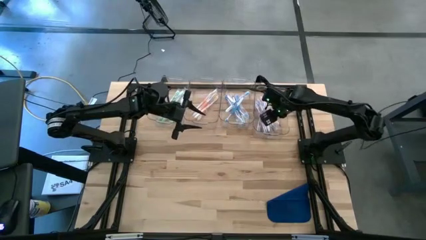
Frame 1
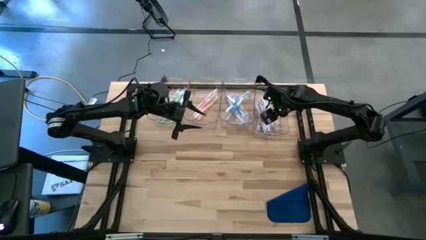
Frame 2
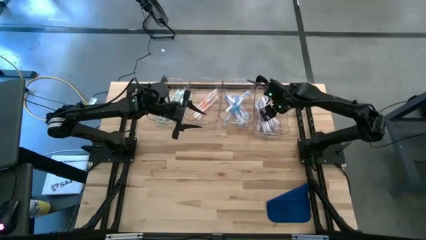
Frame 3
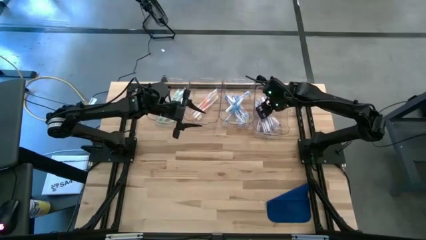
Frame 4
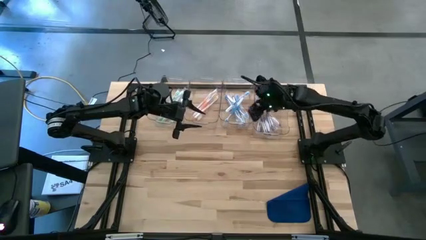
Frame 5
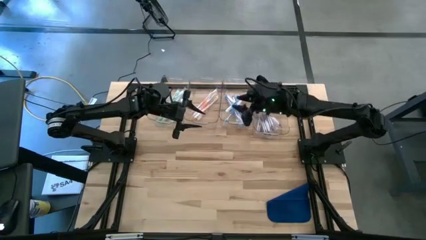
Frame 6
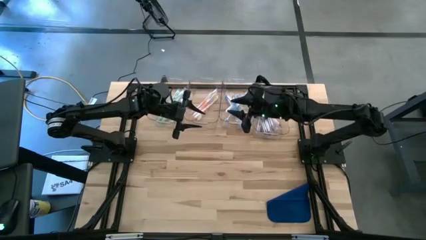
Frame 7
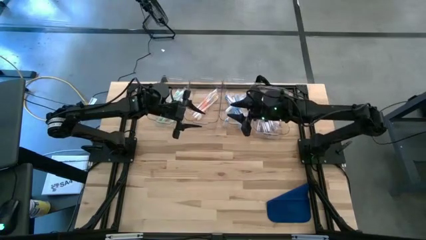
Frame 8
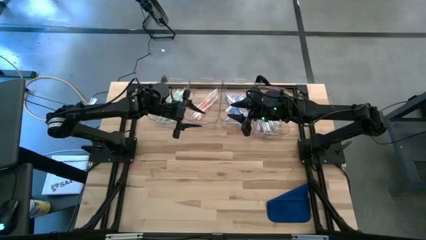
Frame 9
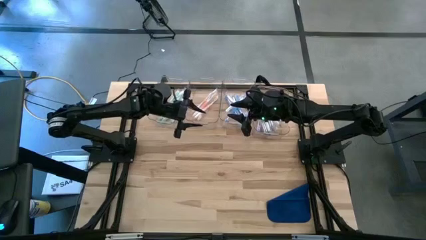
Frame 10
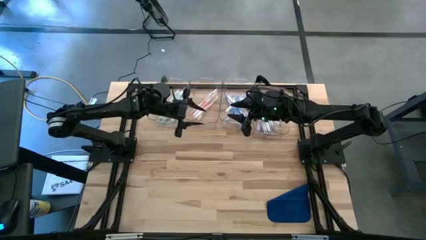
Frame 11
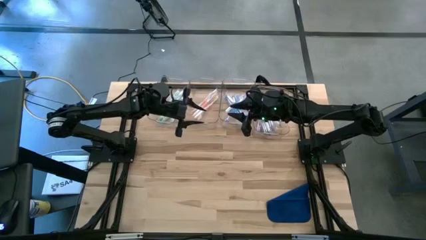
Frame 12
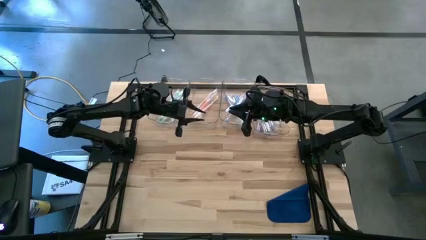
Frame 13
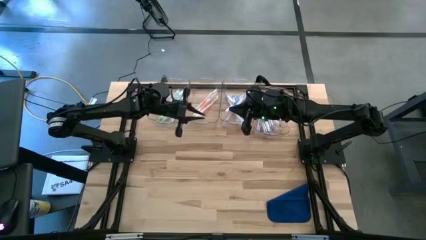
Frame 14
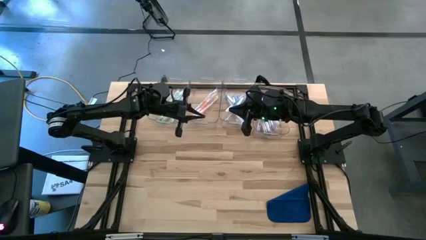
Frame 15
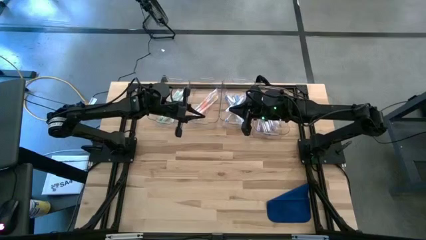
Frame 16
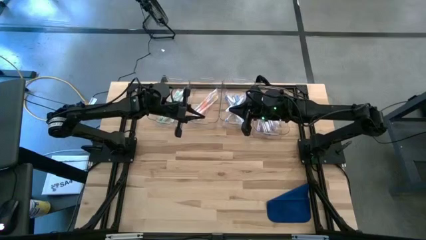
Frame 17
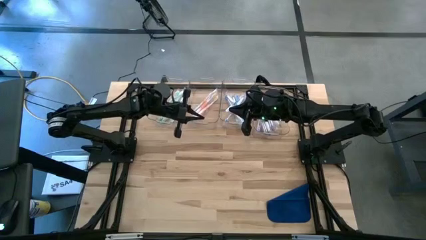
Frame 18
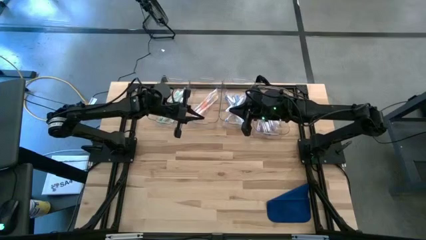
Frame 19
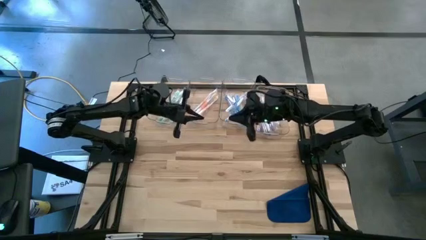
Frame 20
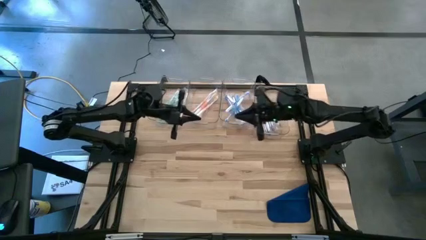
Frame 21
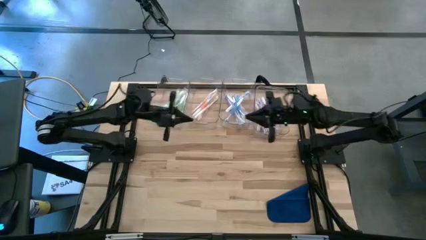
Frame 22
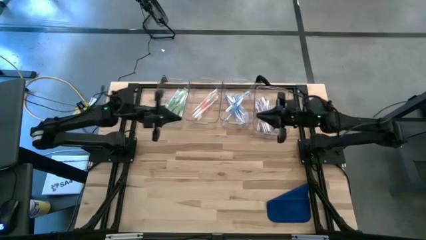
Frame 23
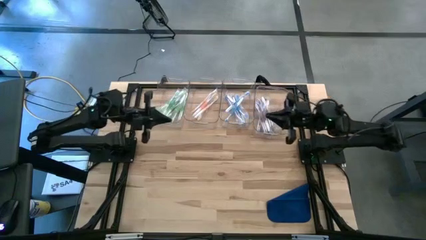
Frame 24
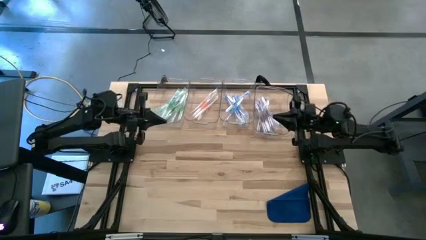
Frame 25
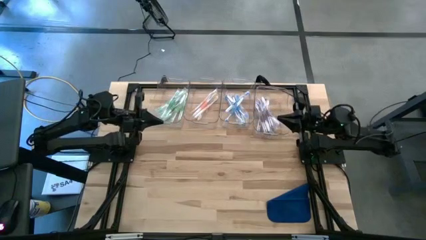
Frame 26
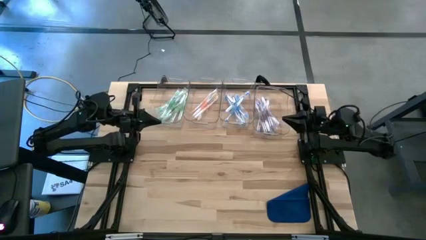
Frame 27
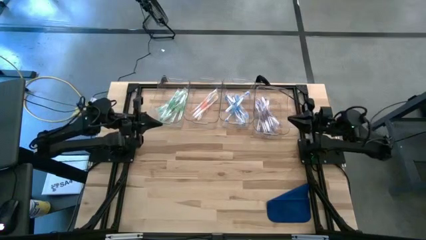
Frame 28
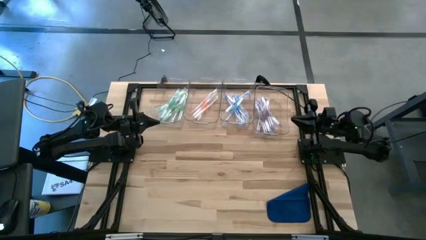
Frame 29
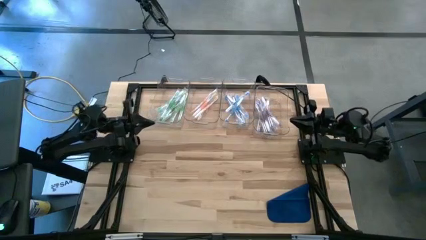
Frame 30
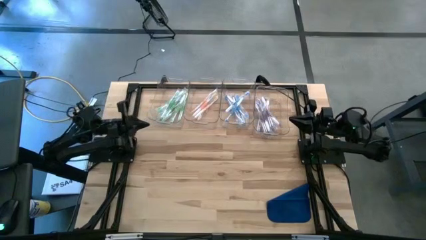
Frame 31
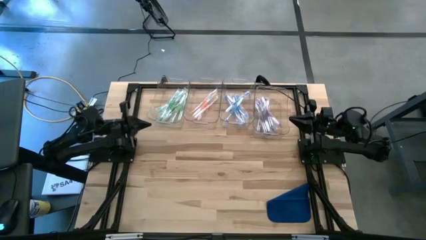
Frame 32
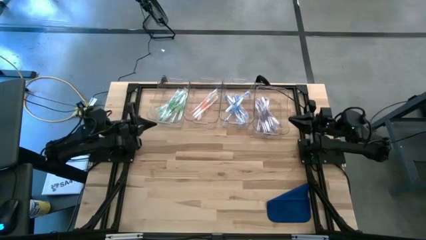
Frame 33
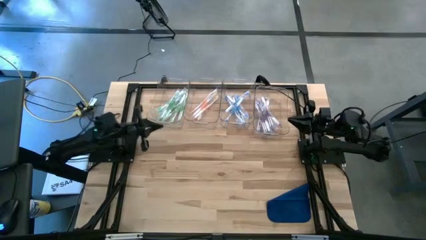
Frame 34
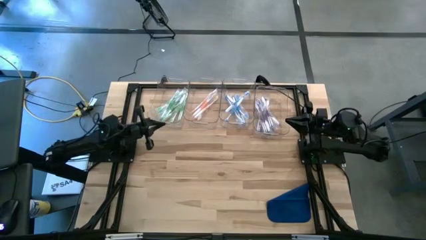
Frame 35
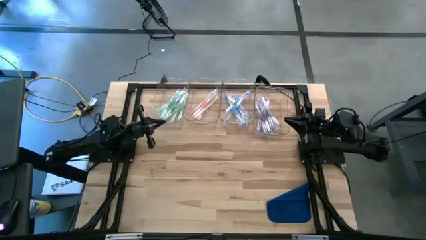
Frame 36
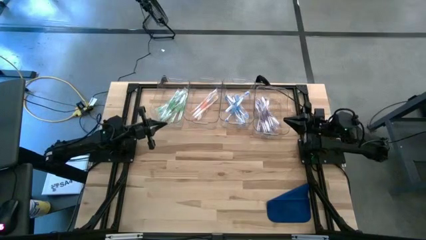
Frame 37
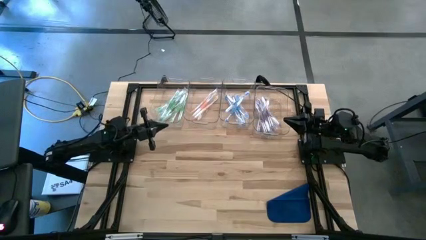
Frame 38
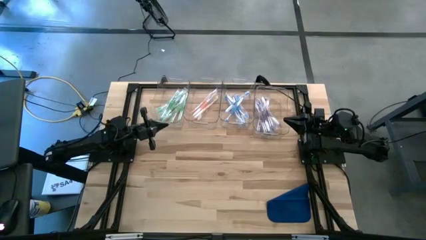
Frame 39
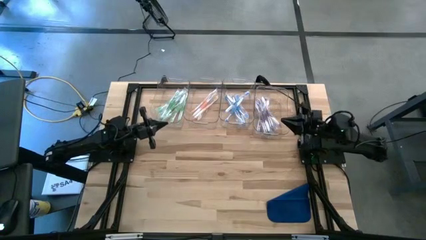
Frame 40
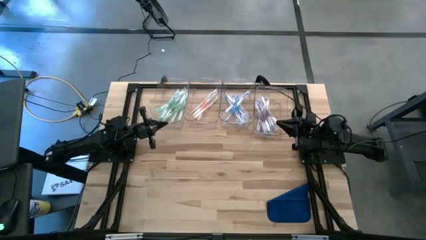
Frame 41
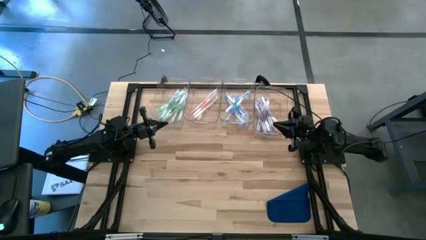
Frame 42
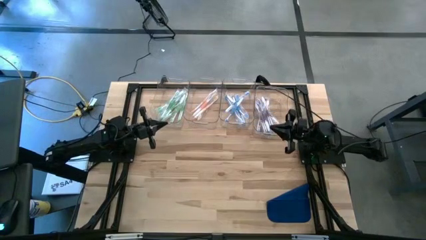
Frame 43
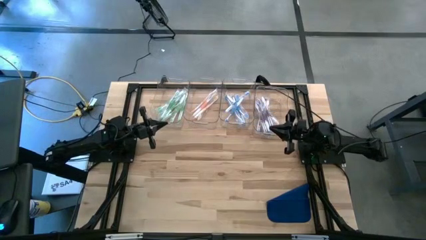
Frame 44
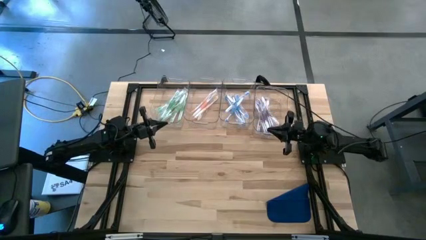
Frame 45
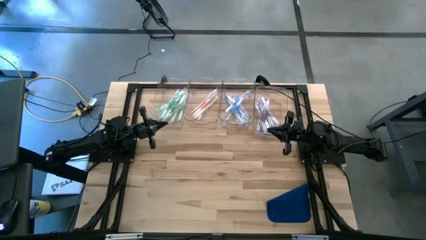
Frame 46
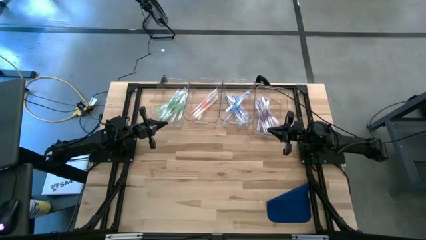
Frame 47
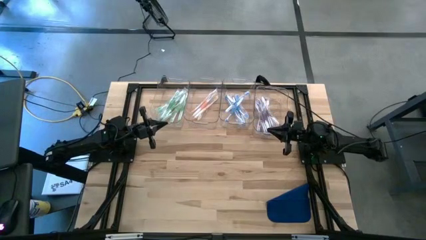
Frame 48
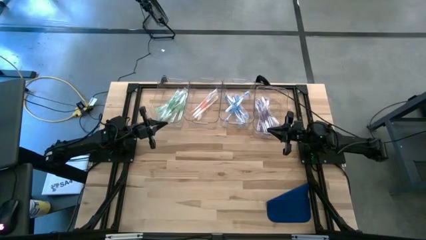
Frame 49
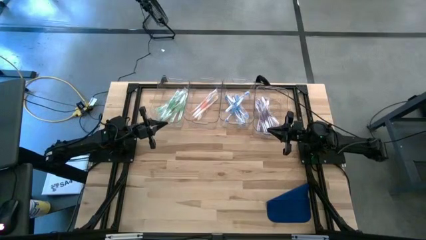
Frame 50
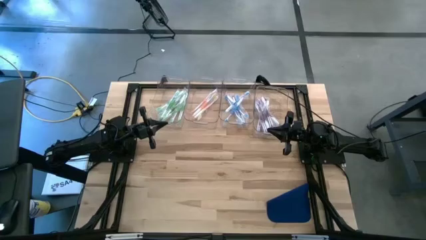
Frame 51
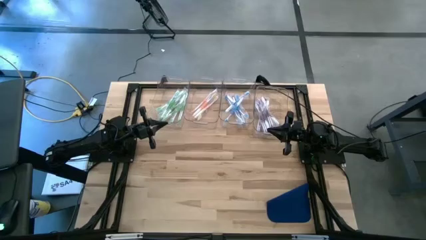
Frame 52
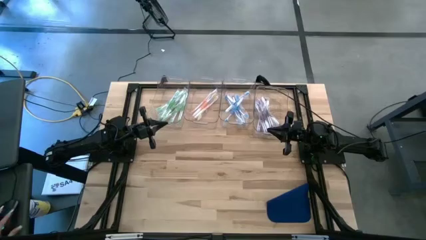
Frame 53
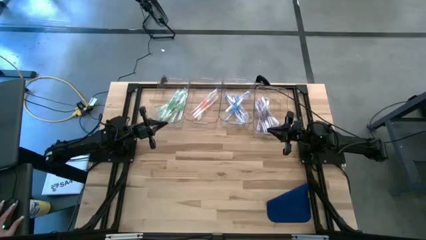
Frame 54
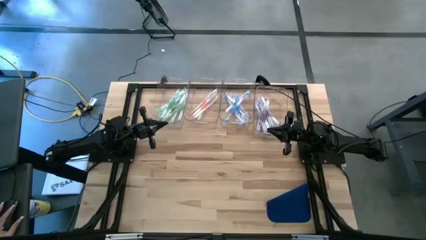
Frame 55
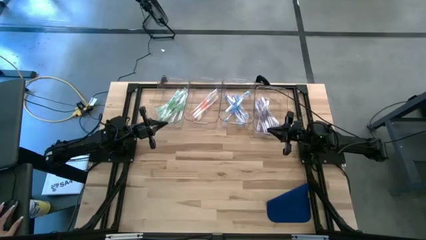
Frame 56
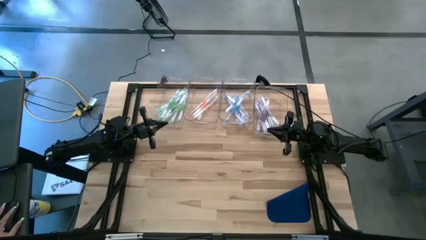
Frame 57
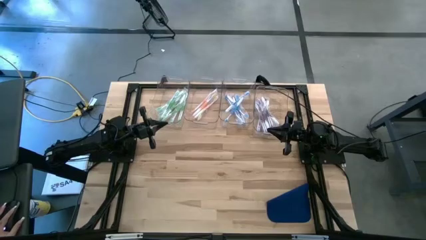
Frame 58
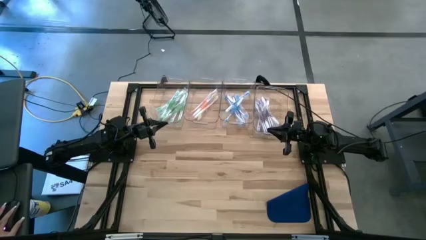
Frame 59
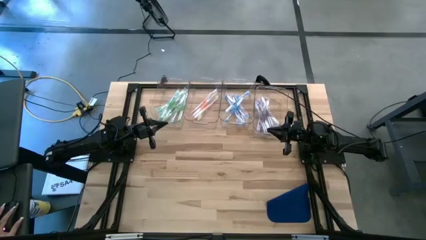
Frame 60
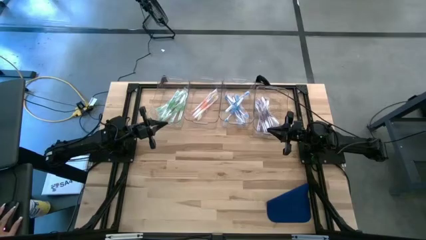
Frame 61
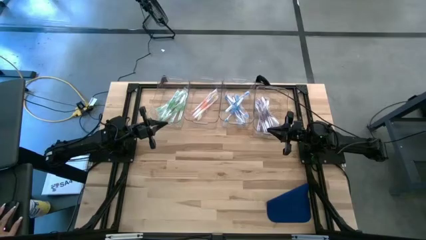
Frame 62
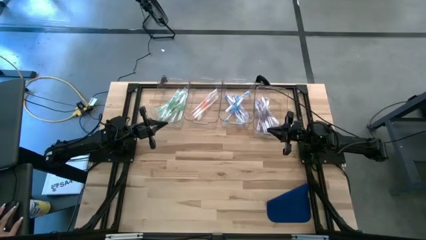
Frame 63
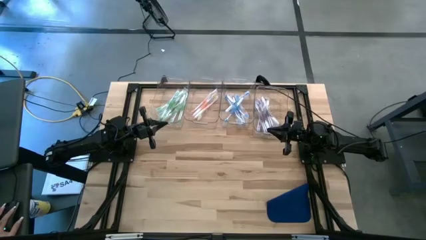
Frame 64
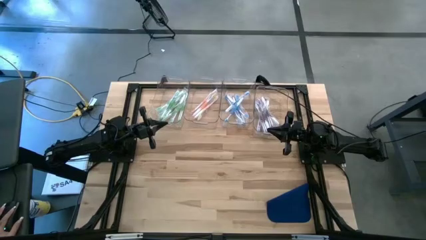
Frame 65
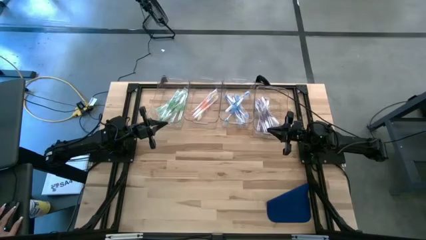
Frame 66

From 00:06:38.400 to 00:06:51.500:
Task: Pick & Place Toothbrushes
Return to Home Position

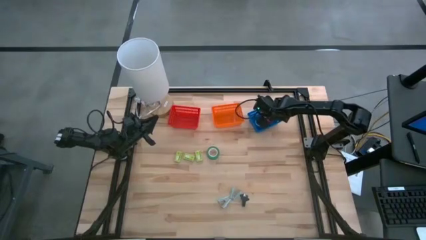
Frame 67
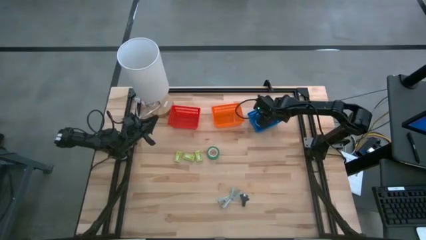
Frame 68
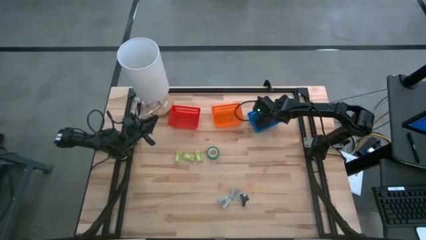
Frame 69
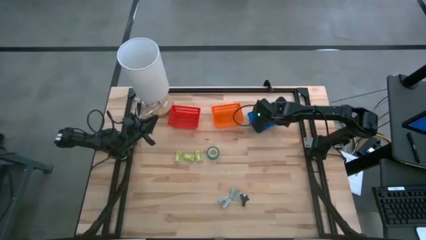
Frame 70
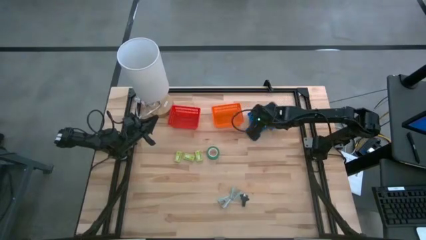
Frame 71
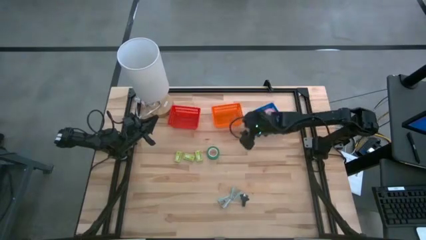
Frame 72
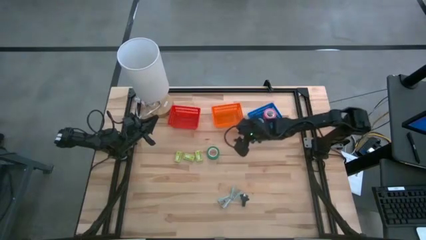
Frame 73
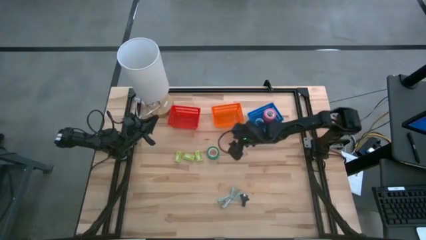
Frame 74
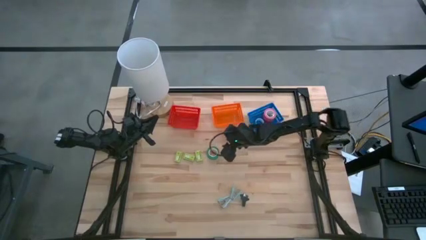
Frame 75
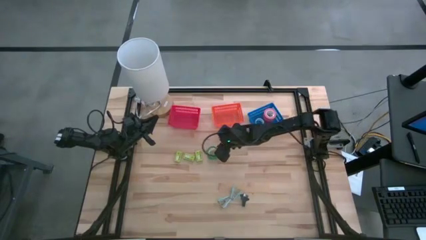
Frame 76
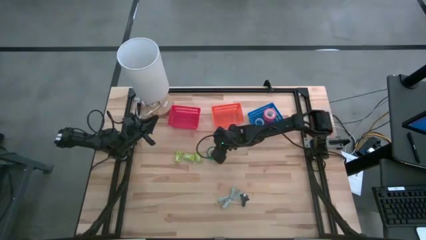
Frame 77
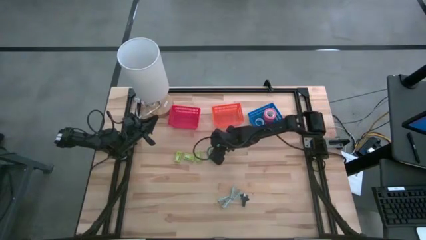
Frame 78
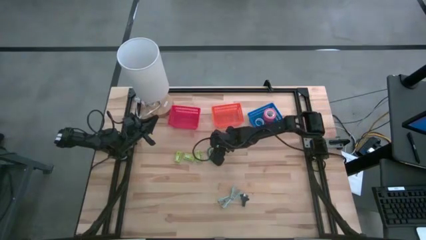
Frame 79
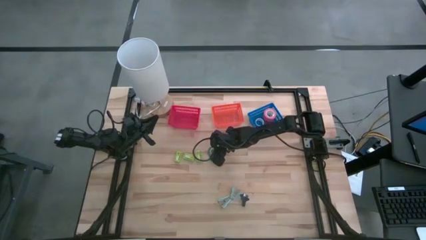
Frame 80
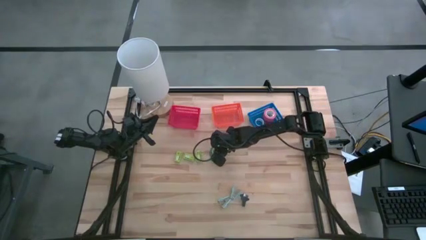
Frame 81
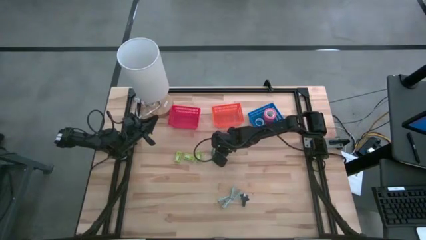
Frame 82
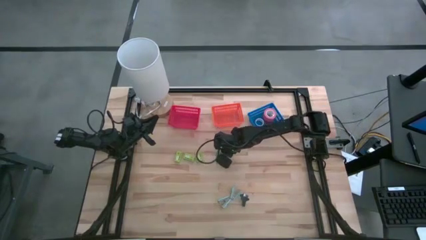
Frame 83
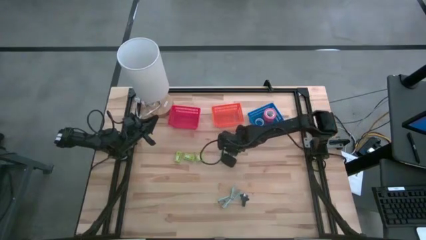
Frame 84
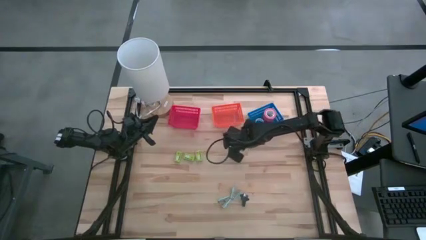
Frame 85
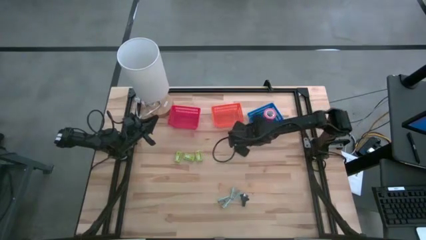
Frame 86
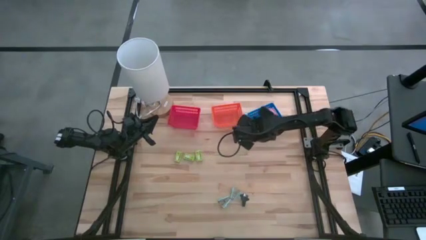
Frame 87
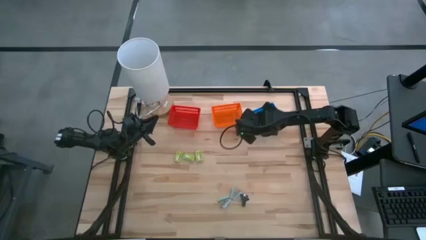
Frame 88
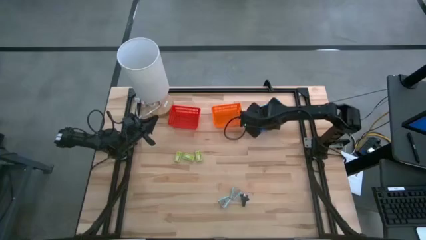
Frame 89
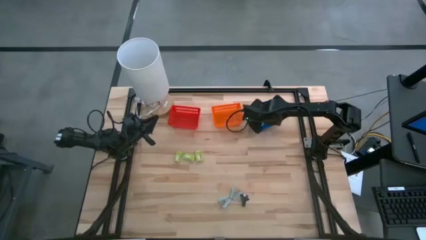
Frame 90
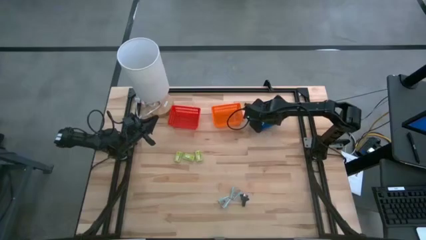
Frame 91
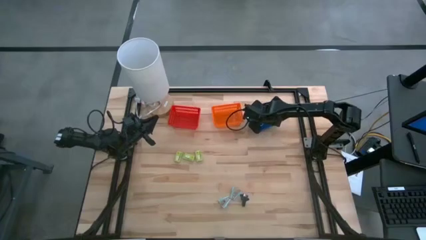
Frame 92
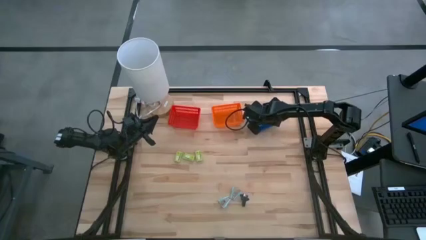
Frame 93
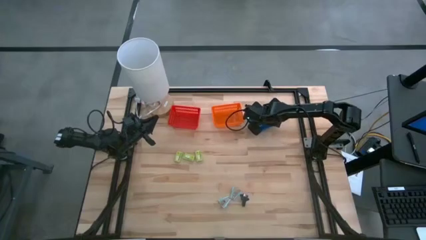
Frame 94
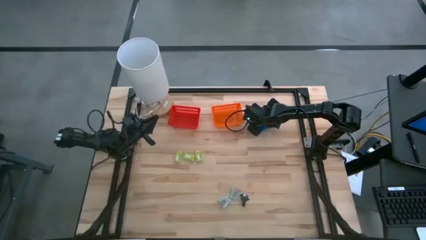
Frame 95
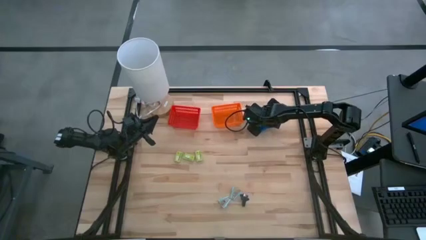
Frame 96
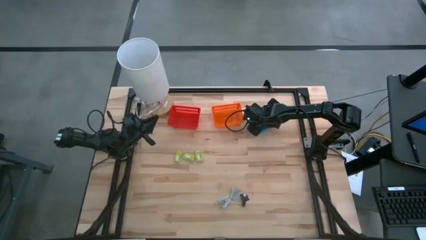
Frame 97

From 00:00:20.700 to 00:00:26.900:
Task: Pick and place Stapler, Stapler remover, tape
Put the green tape on the shelf
